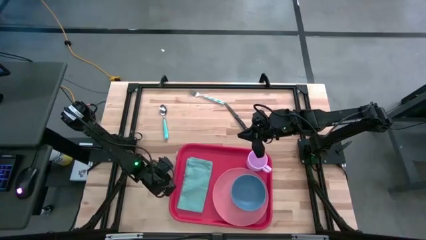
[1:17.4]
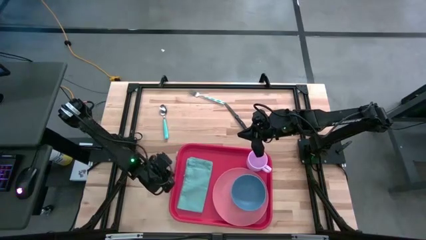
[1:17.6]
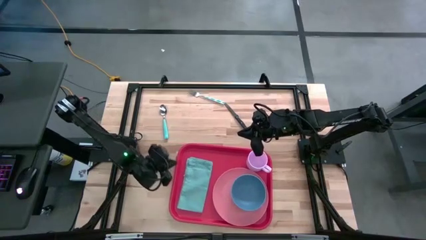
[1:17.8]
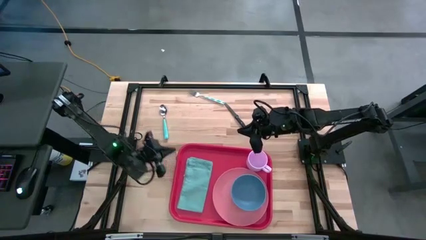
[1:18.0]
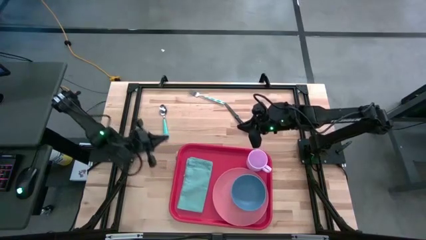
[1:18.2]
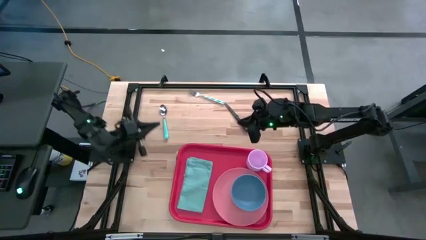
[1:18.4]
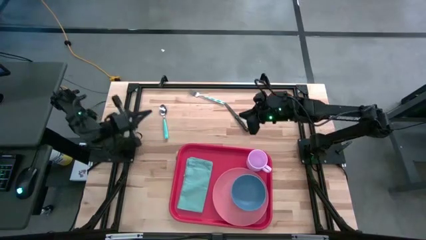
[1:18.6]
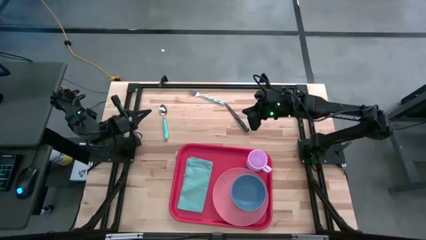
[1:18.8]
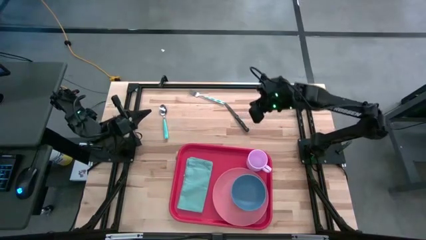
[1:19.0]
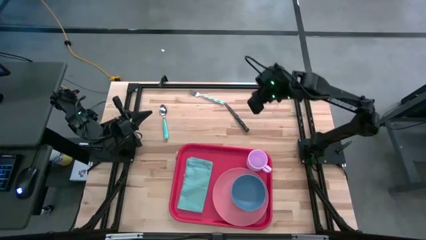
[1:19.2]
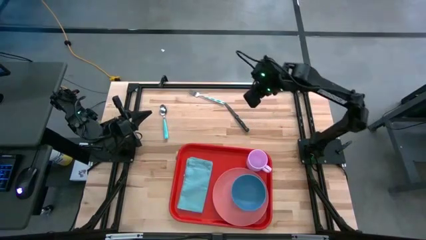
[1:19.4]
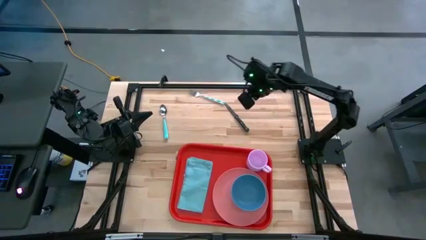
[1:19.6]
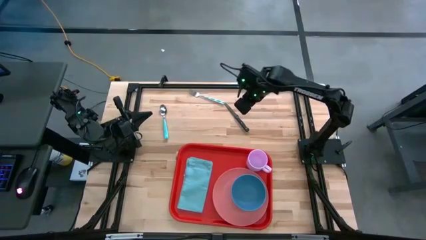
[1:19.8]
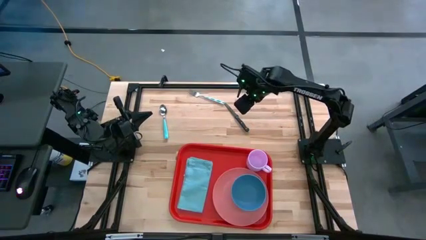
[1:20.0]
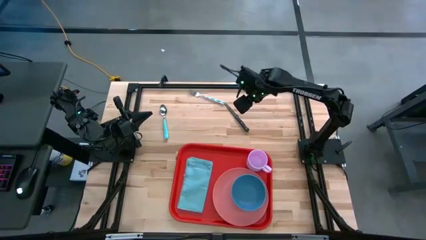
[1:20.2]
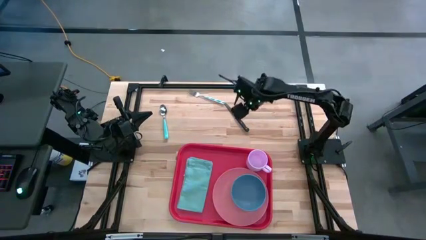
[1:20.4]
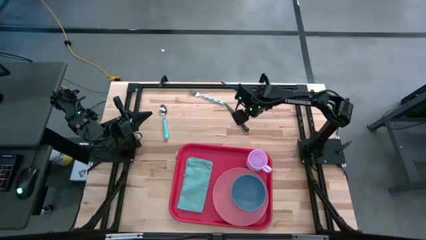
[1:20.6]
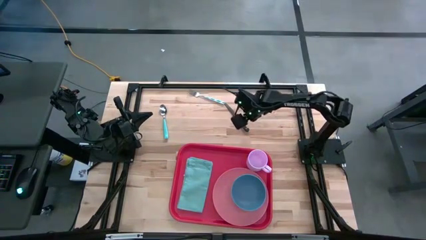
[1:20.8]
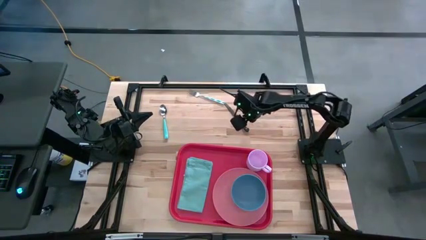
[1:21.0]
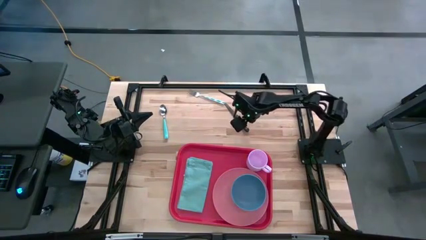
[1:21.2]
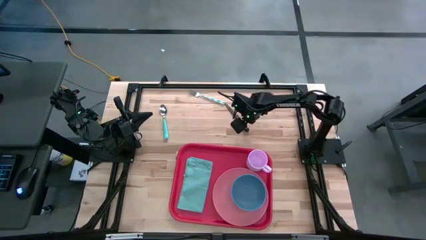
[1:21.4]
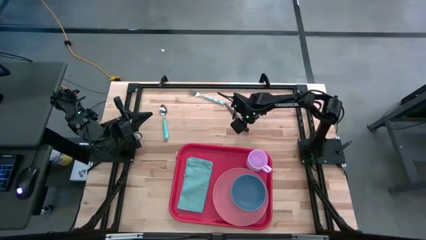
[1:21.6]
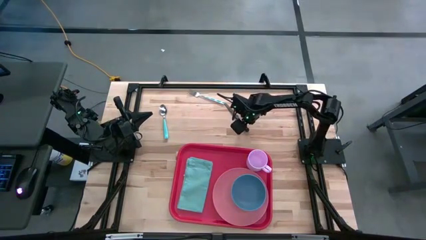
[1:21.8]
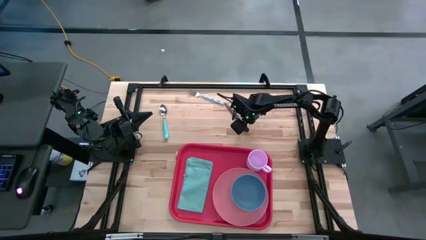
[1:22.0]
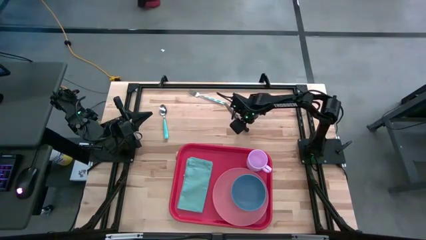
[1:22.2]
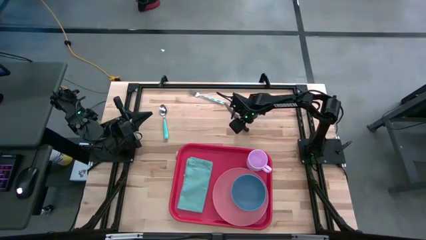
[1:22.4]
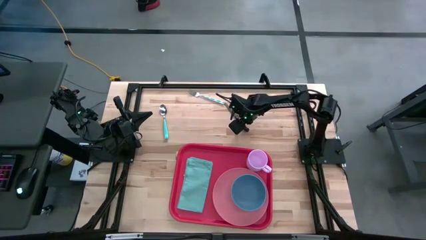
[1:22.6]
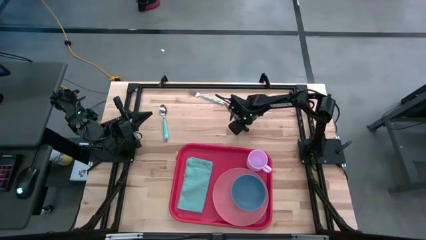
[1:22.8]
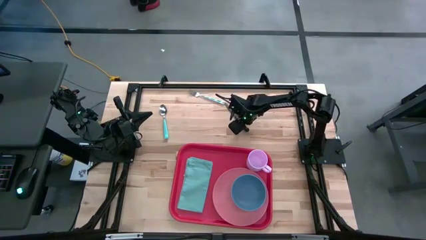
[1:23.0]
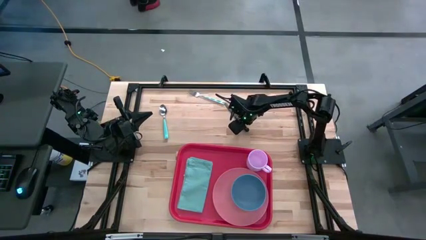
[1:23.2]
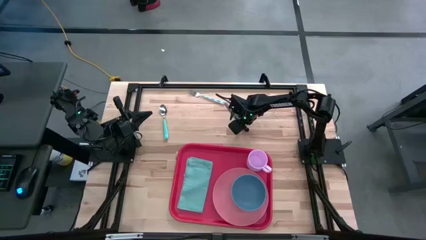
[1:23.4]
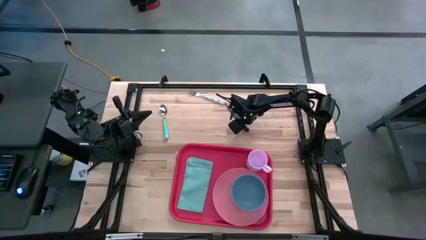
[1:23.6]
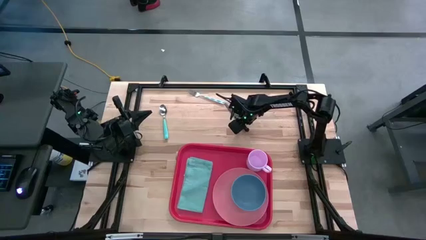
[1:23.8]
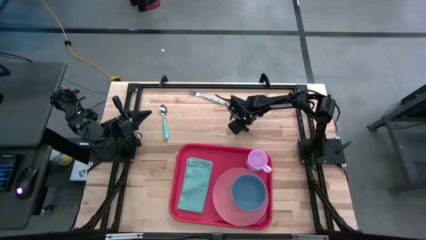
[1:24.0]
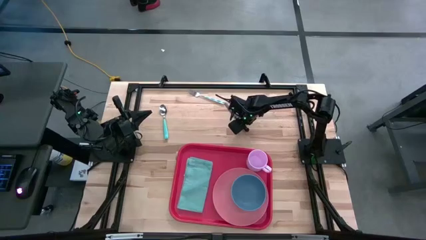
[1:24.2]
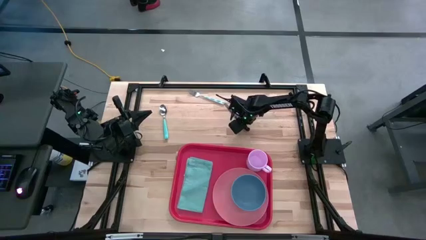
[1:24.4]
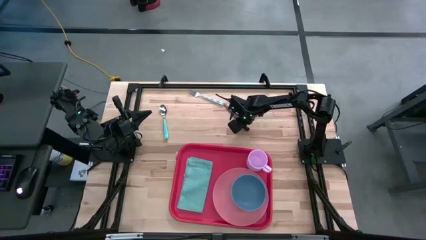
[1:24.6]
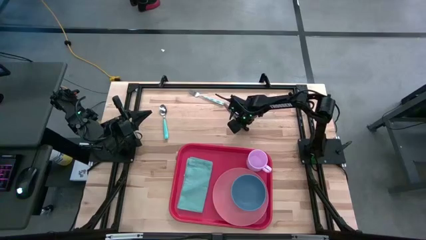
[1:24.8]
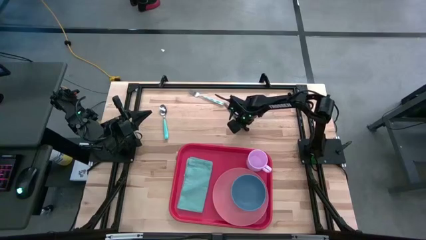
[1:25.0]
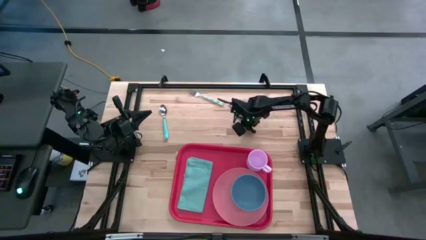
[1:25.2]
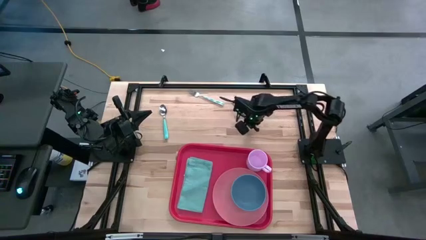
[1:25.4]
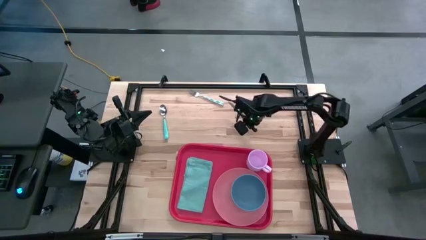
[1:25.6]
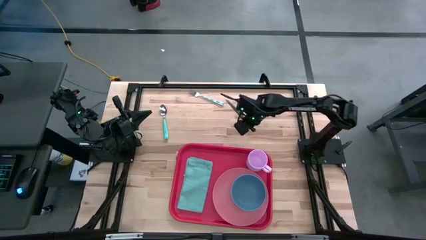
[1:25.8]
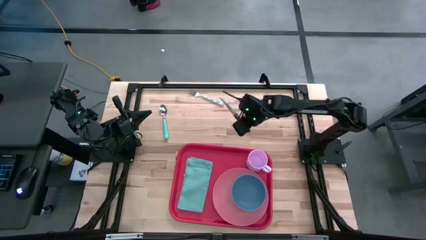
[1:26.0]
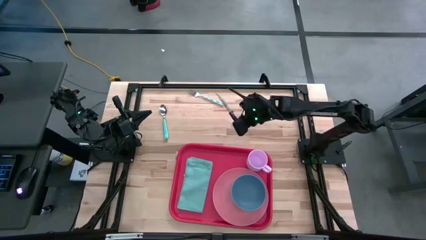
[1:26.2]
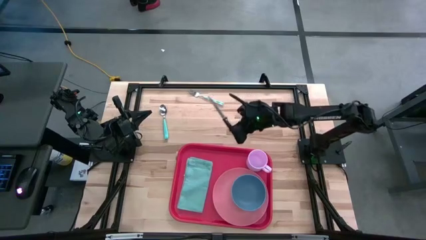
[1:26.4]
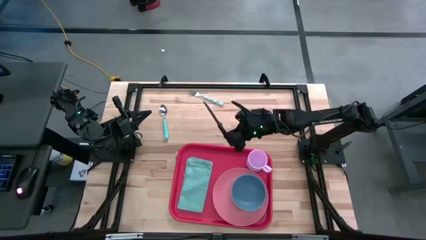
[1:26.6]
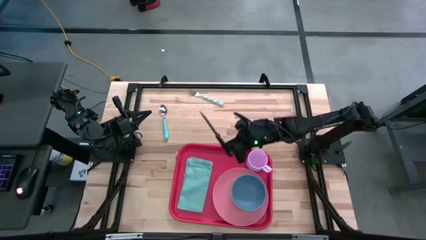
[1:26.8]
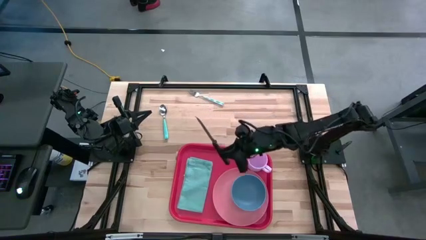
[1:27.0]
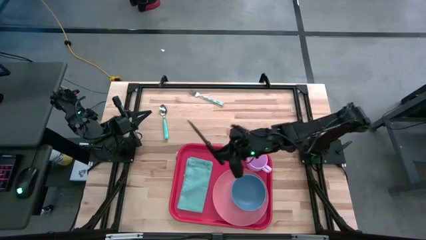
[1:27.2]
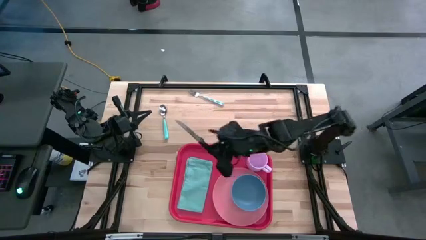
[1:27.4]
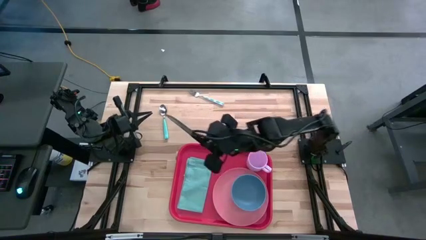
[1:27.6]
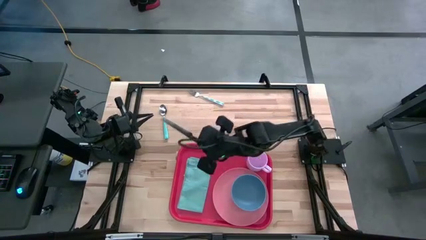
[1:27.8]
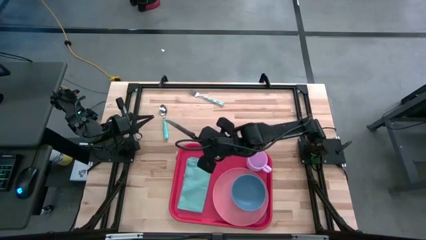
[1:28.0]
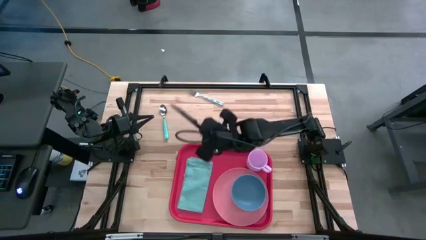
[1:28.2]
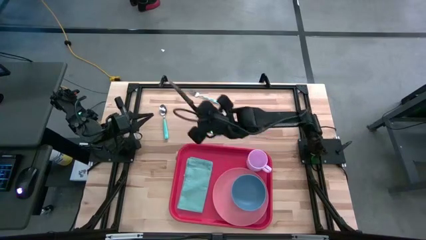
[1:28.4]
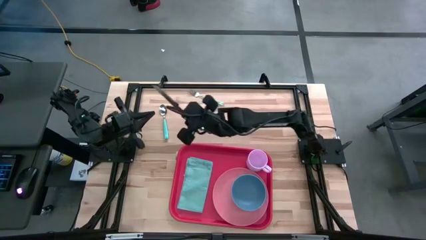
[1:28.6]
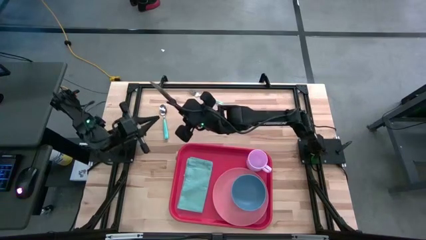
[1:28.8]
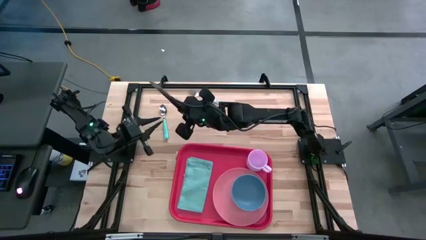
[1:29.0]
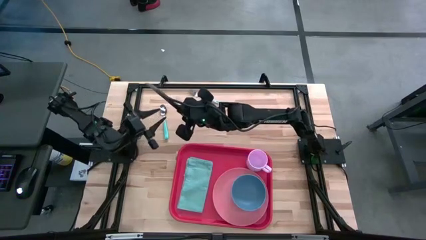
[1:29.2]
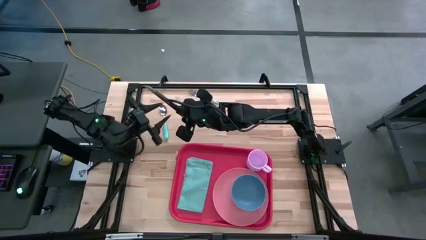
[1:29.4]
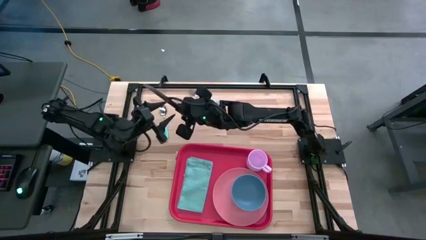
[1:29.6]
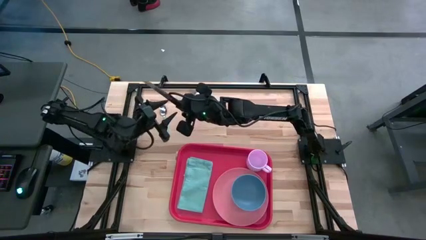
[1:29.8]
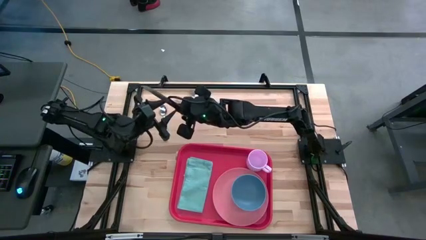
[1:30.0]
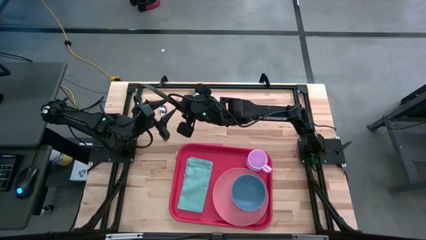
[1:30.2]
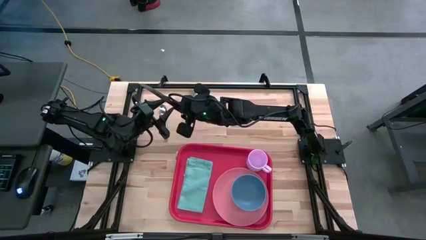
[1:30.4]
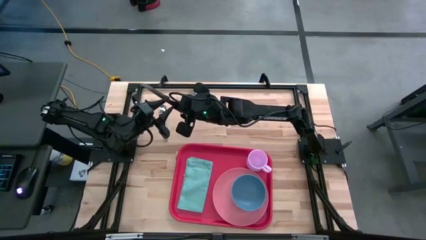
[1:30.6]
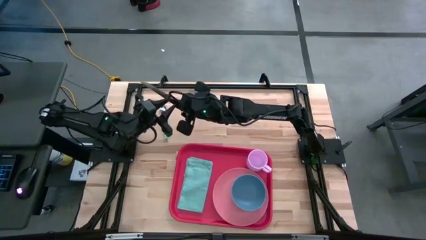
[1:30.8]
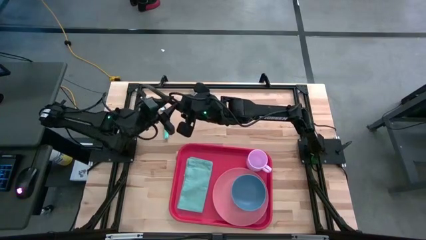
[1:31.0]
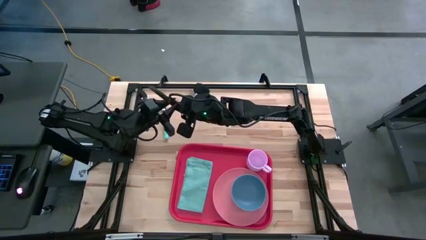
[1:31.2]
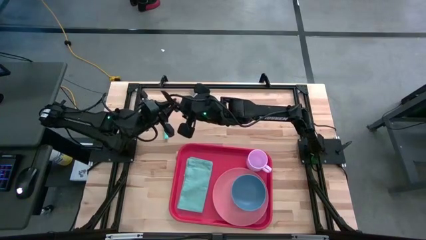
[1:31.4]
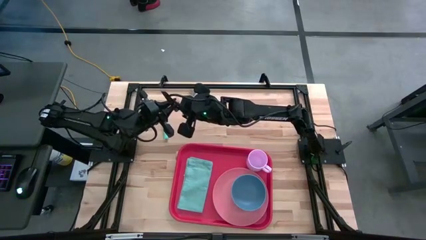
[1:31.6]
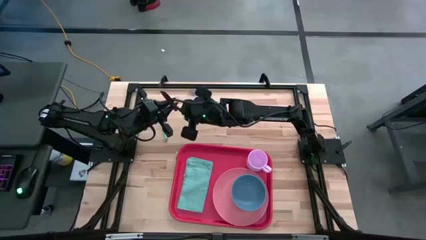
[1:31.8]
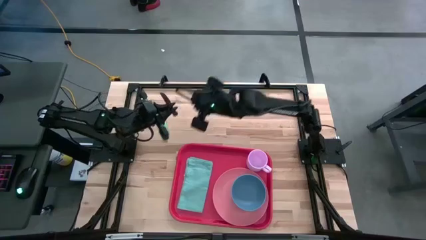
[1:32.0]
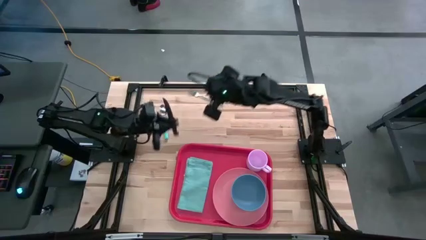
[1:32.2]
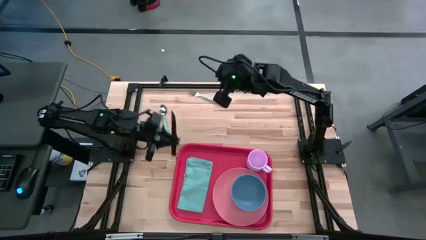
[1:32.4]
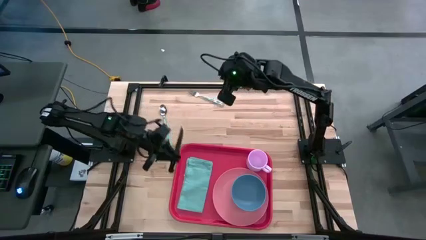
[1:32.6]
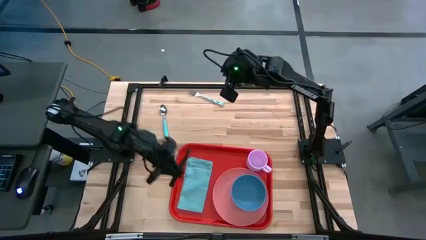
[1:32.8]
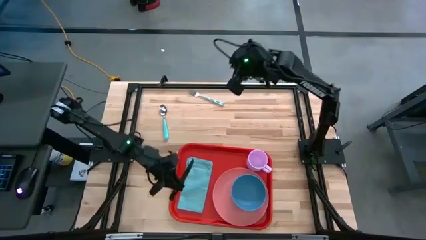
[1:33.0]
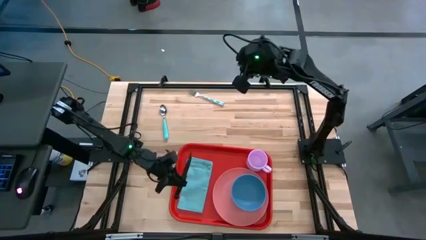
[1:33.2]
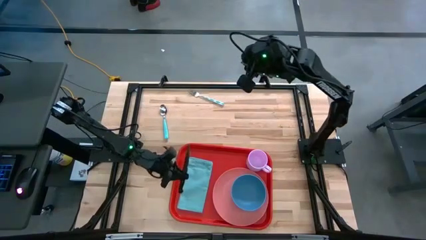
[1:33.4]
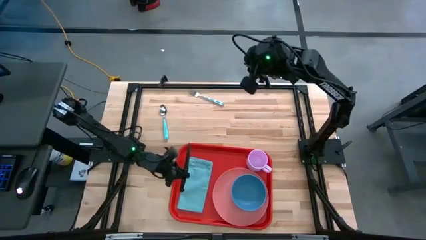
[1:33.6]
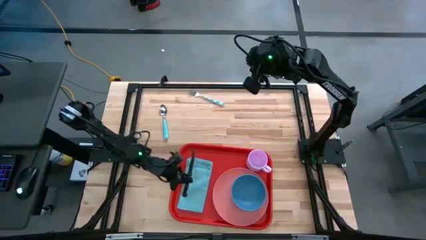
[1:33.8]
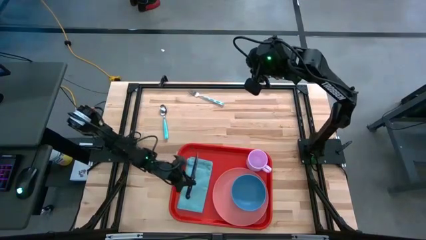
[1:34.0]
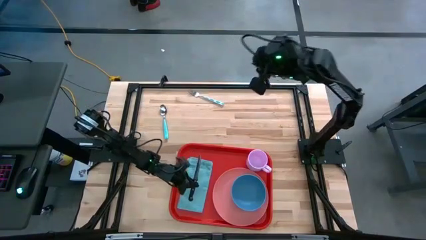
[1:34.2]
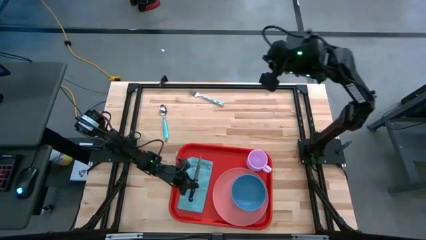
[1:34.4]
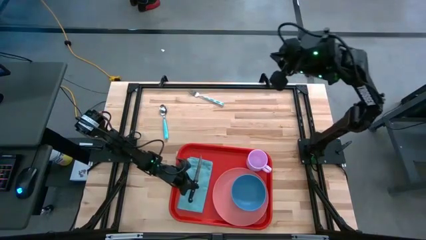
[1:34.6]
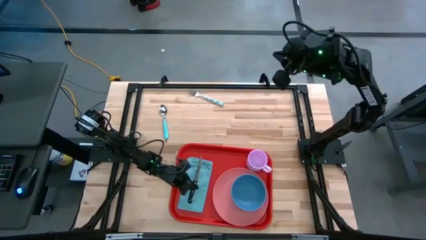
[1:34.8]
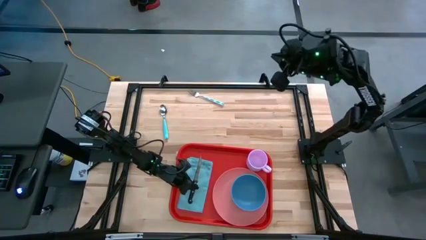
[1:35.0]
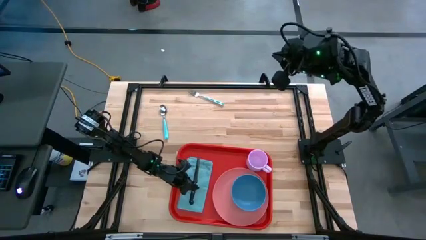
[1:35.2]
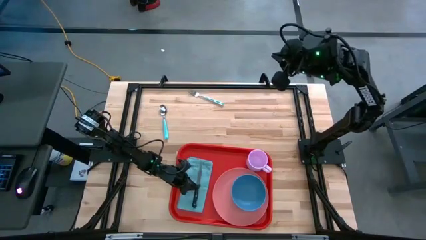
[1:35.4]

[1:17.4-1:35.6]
Task: Set up tray
Put the black table knife on the blue table napkin
